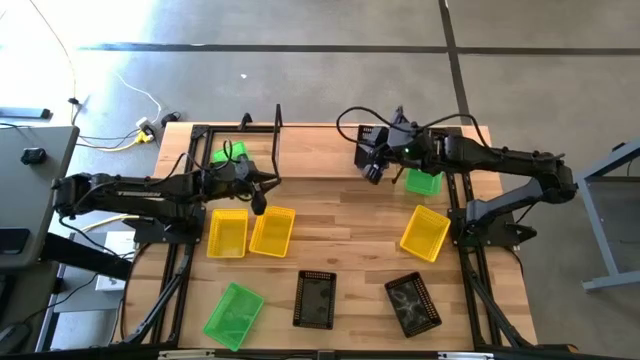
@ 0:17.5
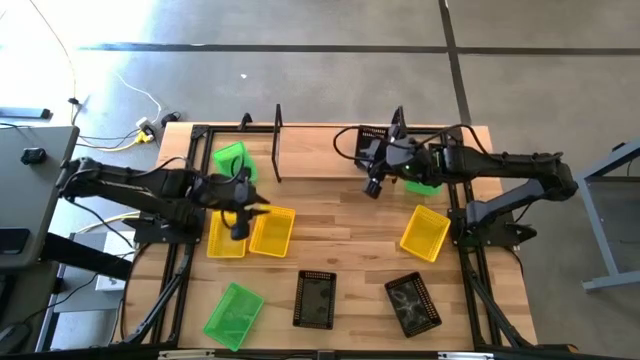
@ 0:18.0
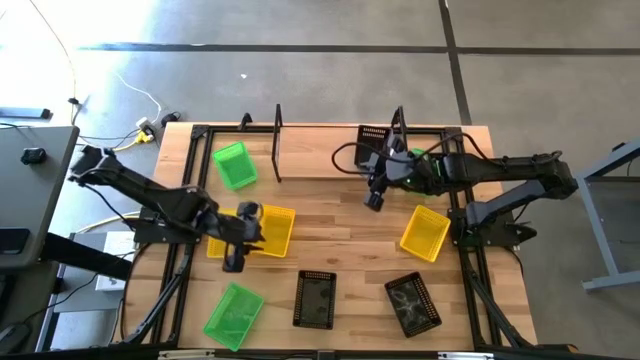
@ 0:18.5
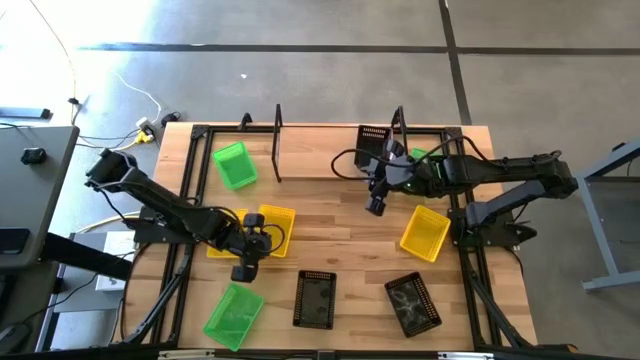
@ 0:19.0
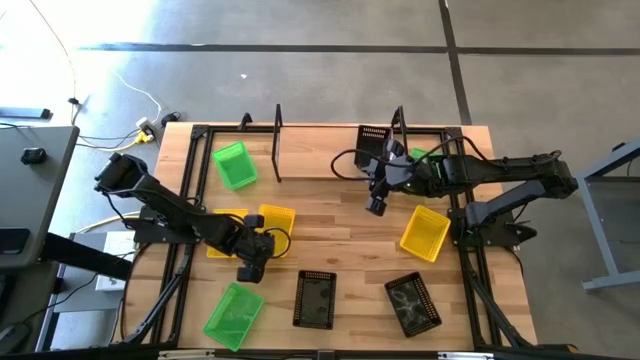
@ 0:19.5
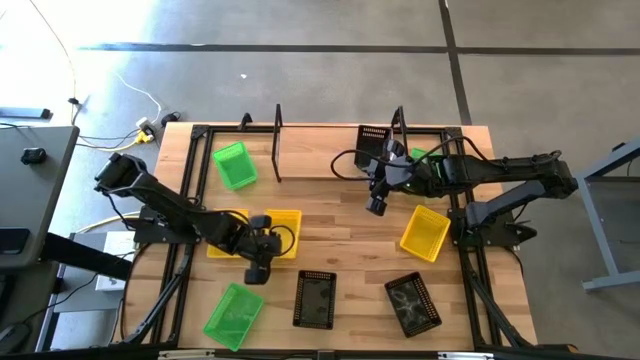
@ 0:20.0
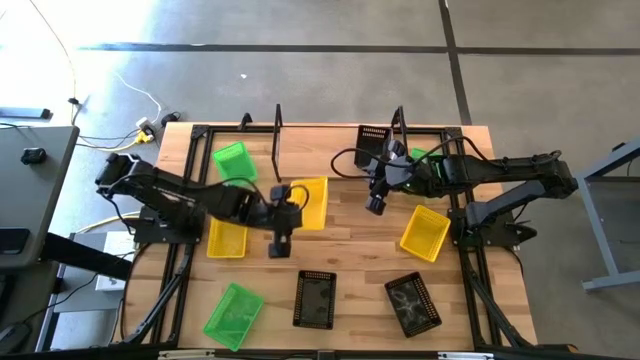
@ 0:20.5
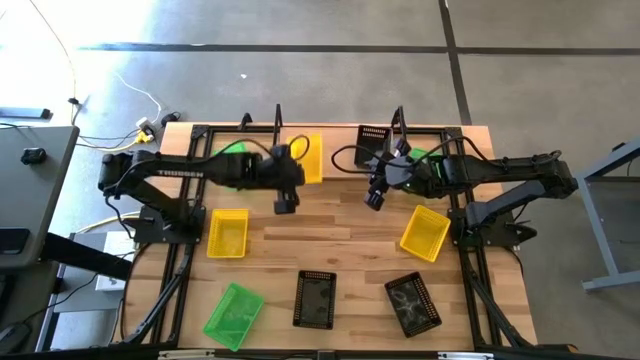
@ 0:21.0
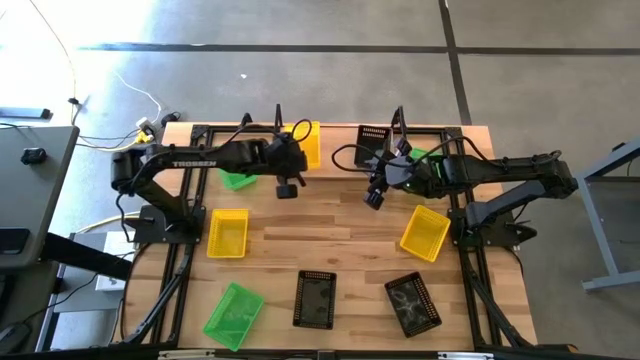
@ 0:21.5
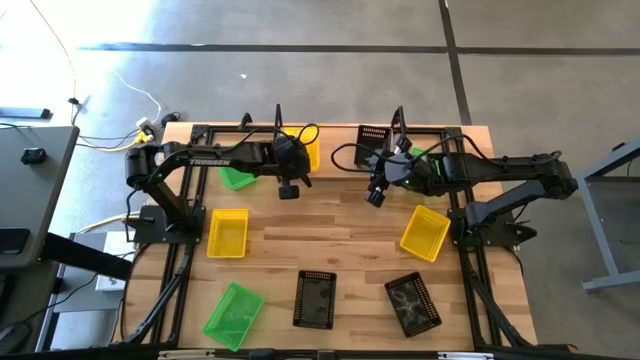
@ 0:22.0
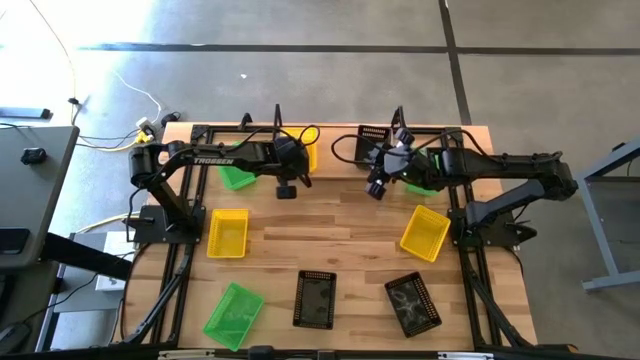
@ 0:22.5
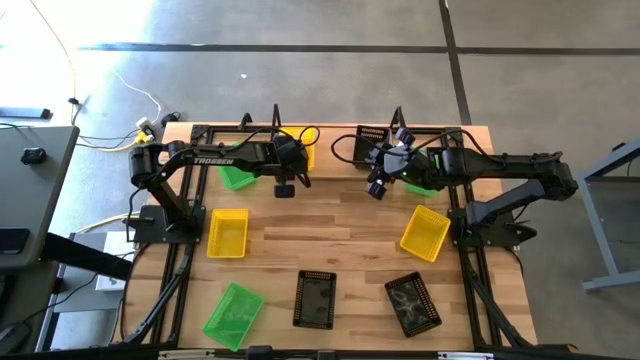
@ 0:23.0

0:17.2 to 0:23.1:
Task: Stack baskets on shelf by color
Put the middle yellow bin on the shelf

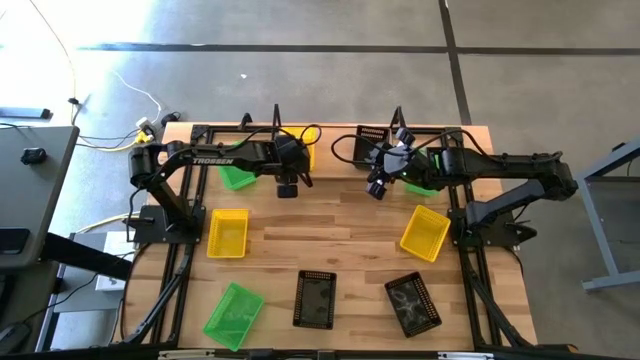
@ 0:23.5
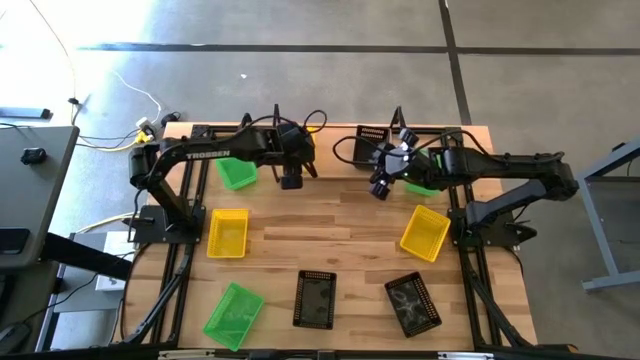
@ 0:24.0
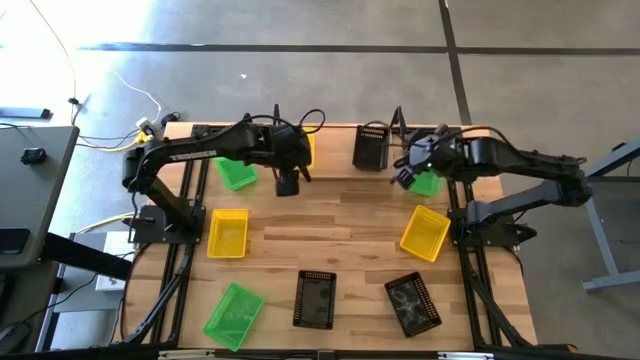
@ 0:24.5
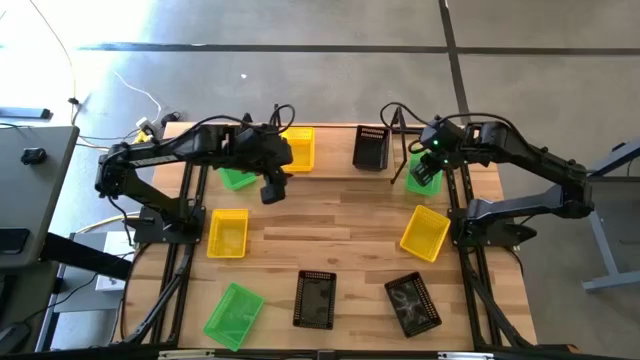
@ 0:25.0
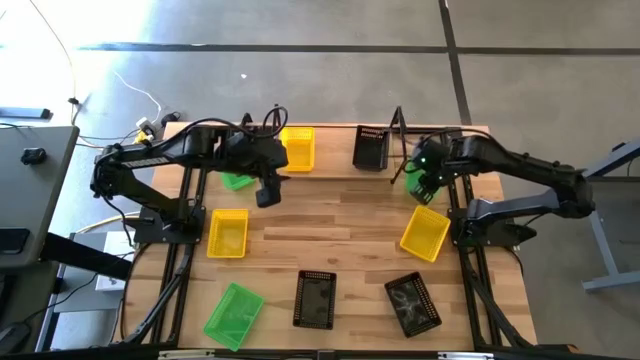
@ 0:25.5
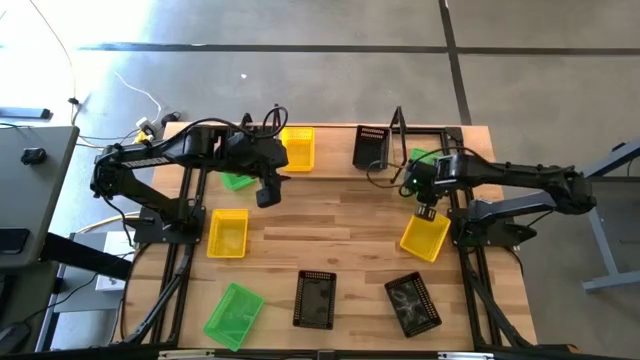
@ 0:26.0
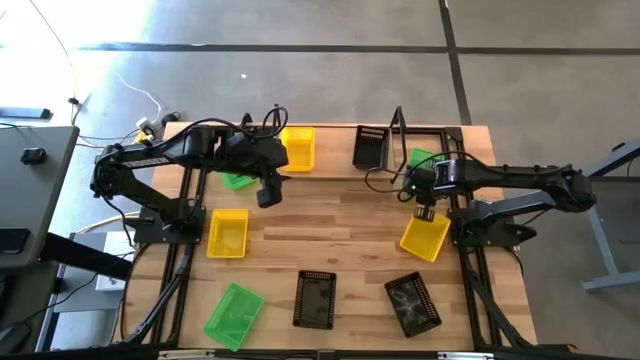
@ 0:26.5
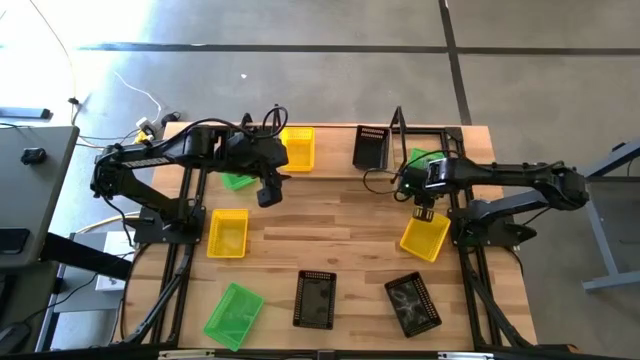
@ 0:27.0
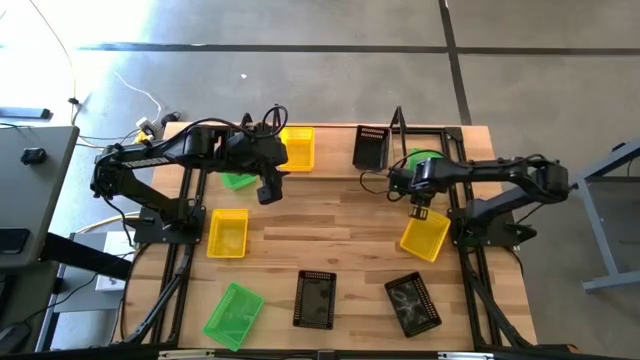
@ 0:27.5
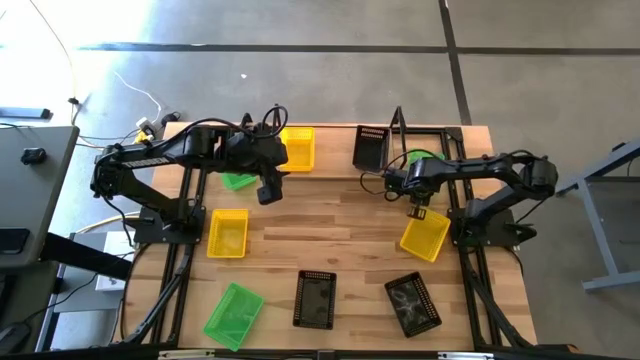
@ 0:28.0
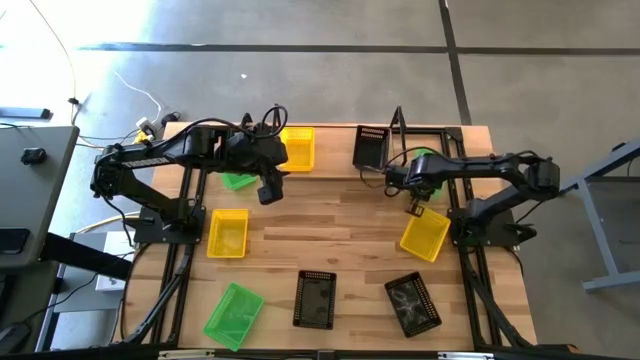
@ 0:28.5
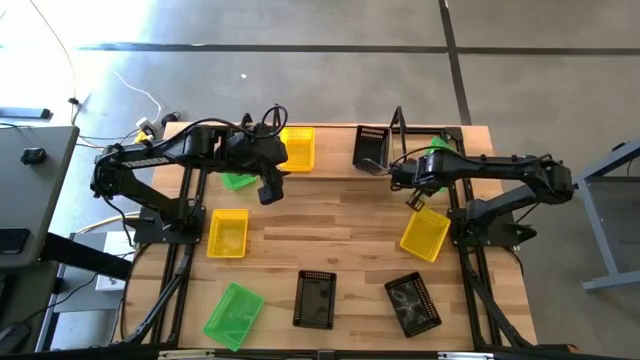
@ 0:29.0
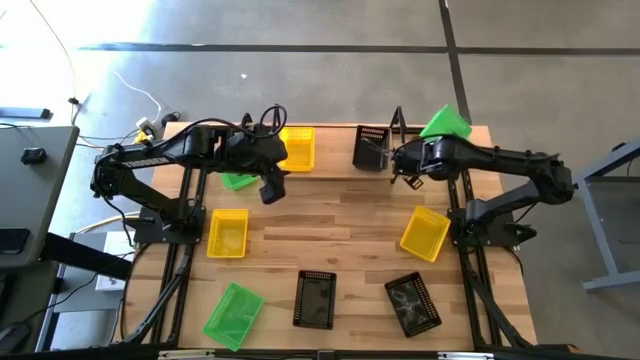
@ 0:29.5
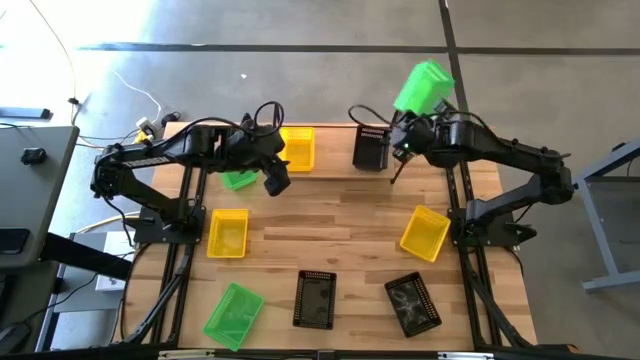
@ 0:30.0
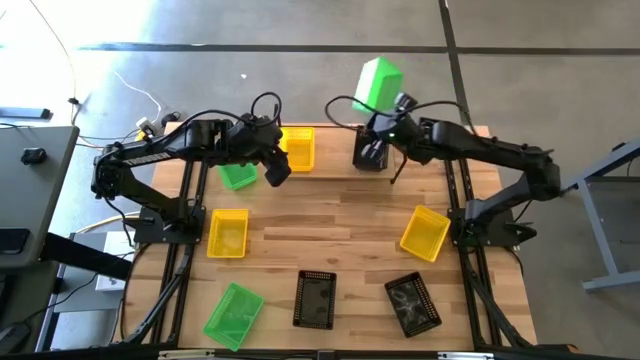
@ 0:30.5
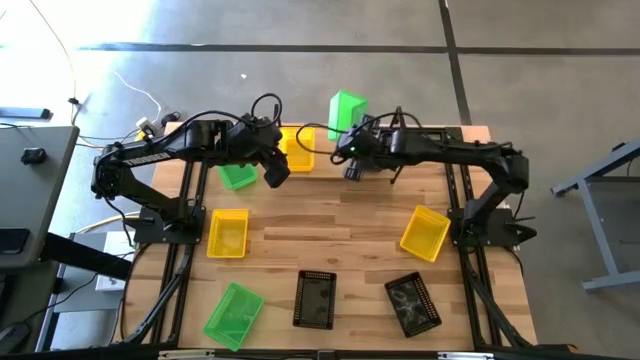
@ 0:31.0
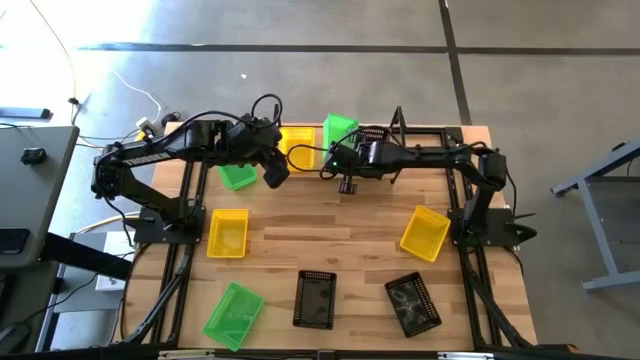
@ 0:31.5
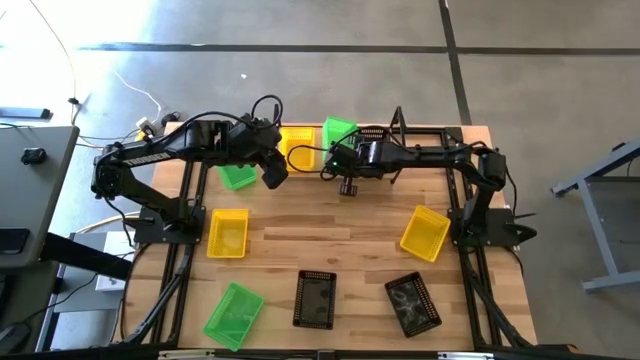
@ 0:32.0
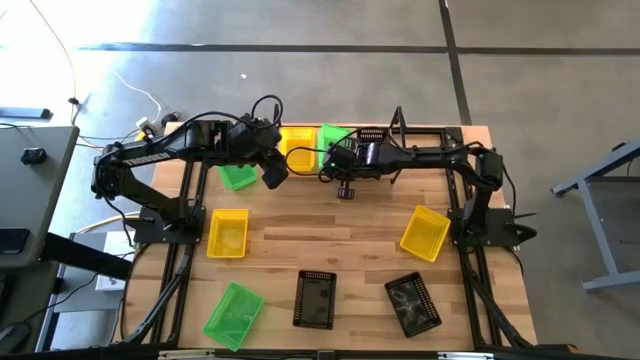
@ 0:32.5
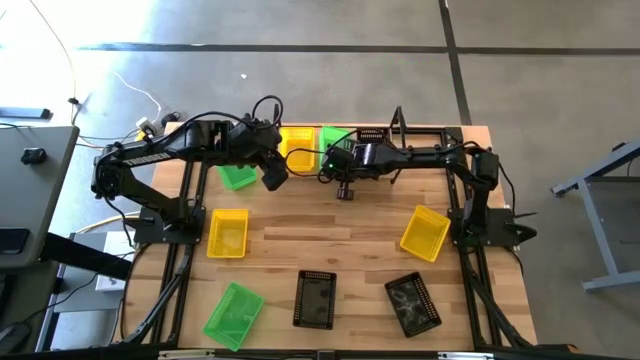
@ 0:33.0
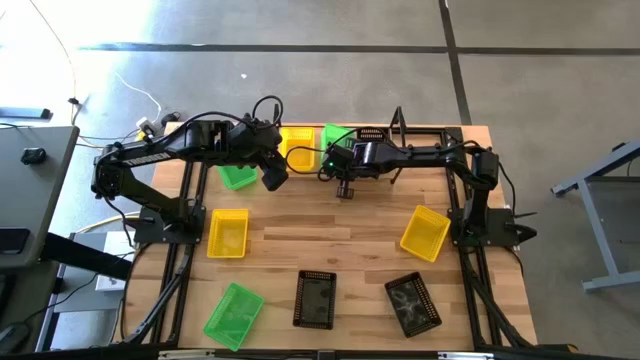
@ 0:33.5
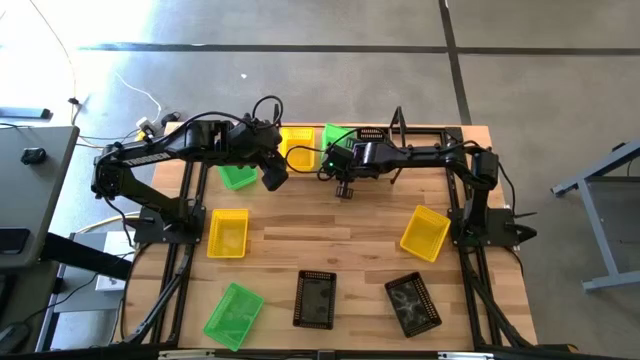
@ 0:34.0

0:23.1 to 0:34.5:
Put the top right green bin on the shelf

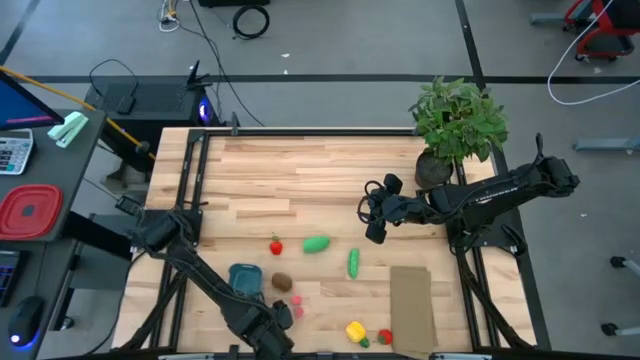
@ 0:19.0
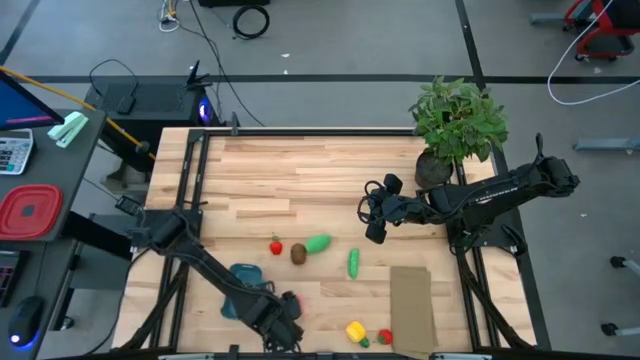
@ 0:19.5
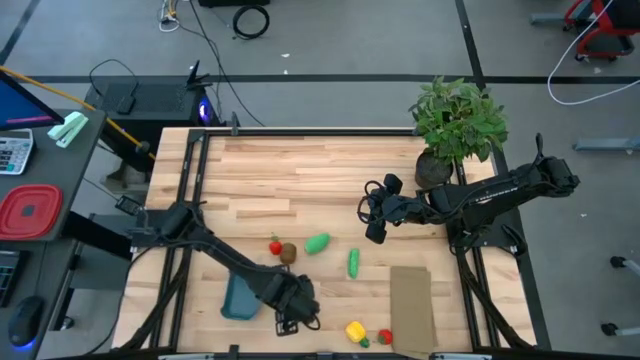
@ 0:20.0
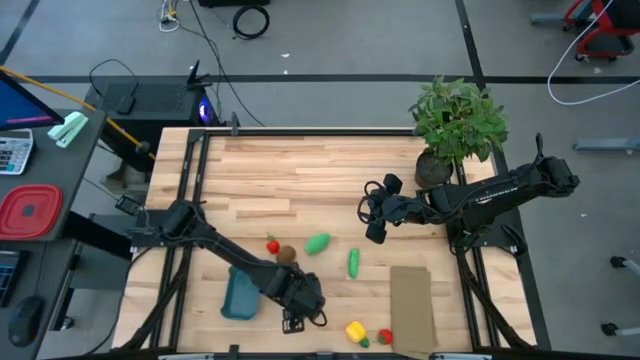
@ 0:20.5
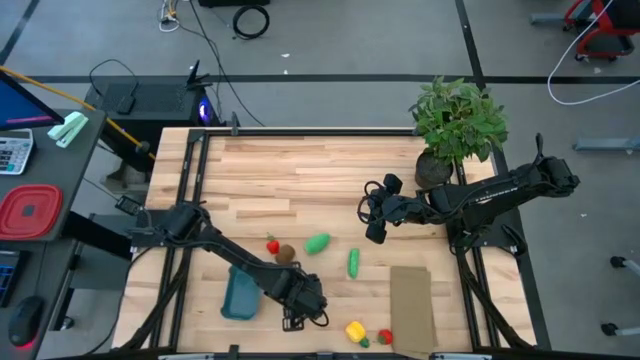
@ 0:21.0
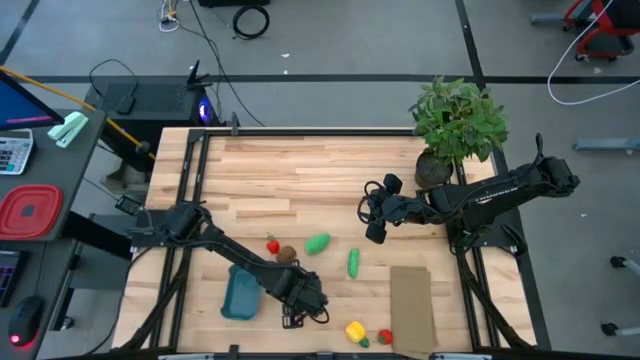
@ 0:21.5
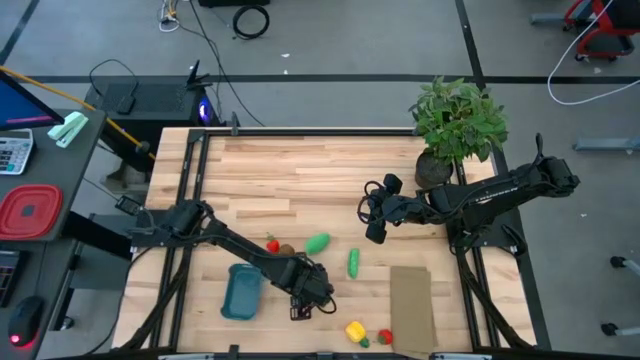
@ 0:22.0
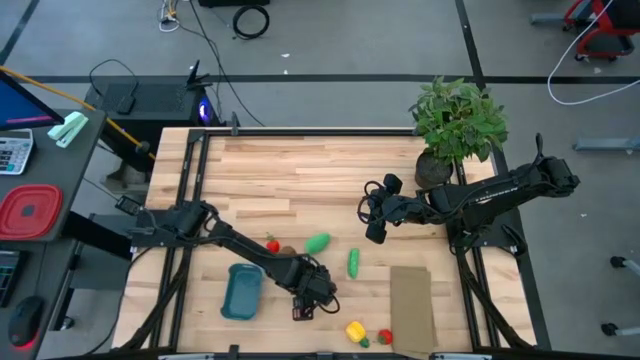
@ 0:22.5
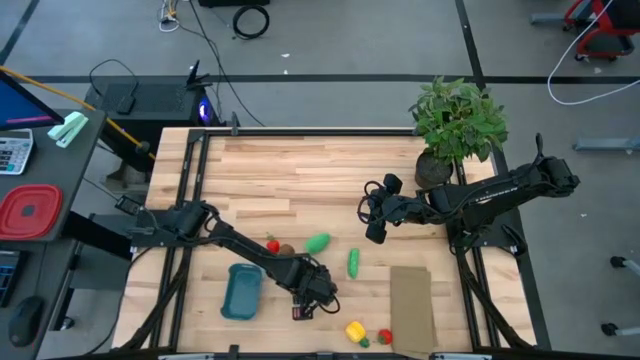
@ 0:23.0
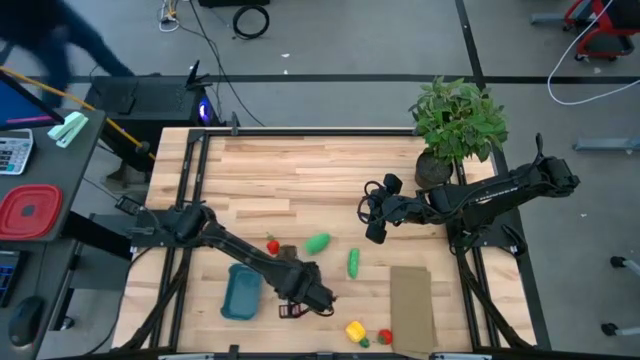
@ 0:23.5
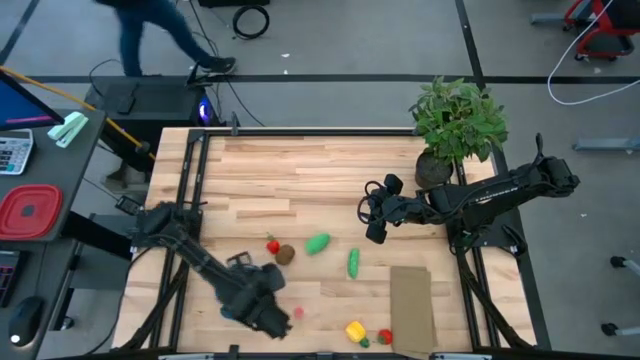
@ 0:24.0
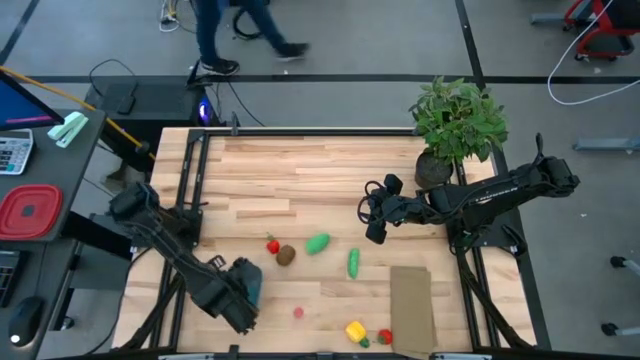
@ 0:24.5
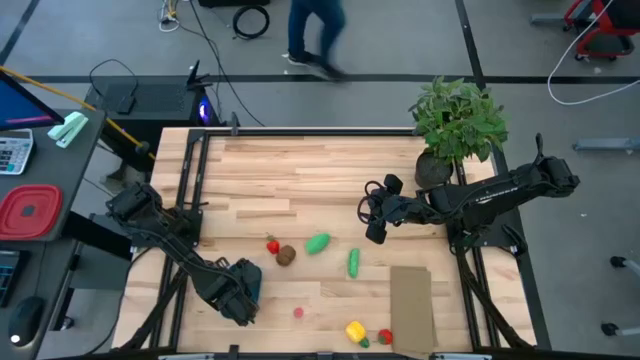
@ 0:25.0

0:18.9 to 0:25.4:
Task: Pick and placing Produce into tupperware
Put the top pink peach into the blue bin
